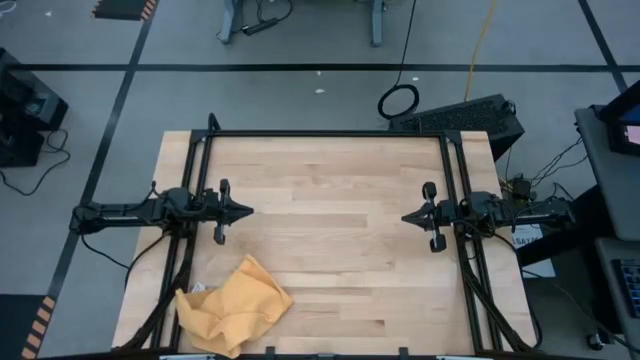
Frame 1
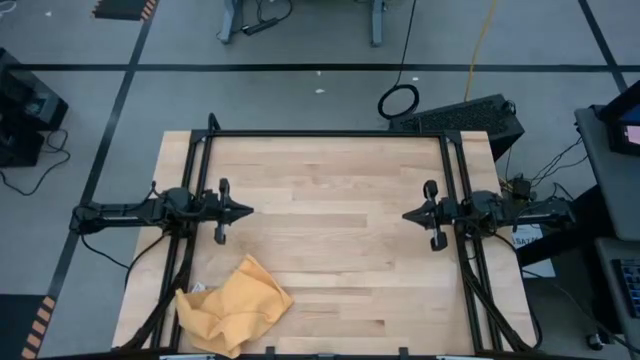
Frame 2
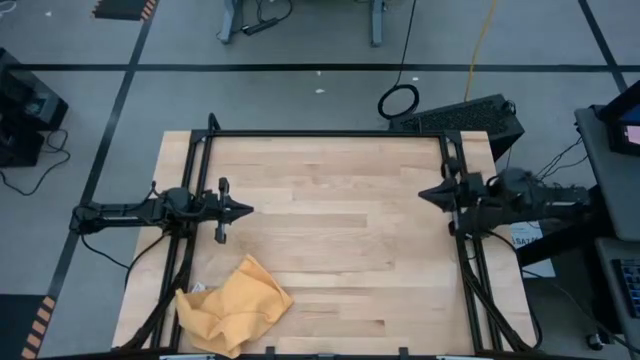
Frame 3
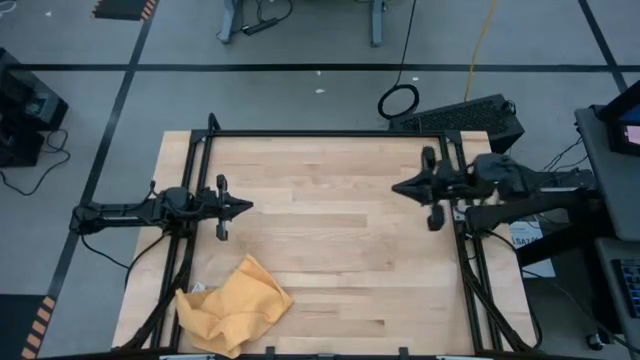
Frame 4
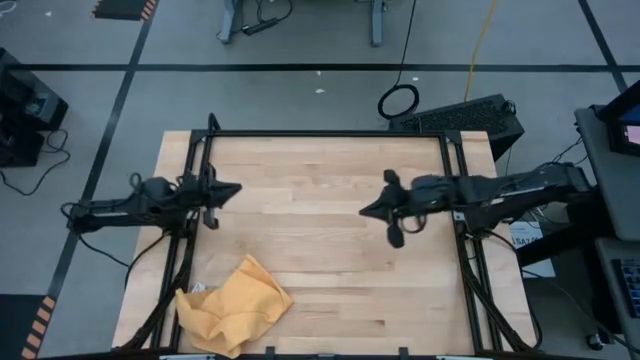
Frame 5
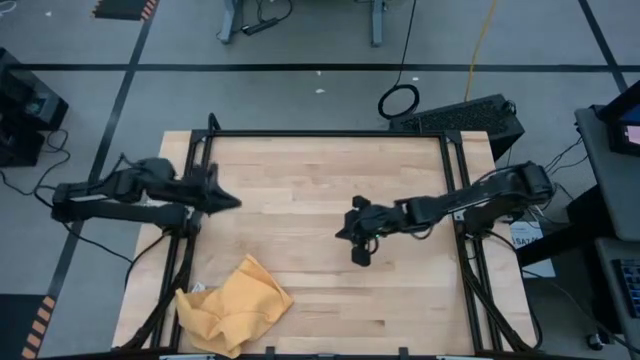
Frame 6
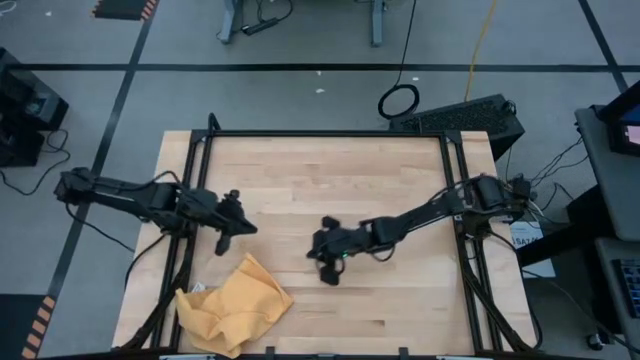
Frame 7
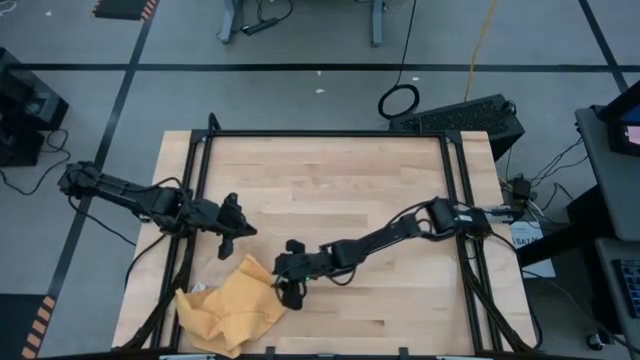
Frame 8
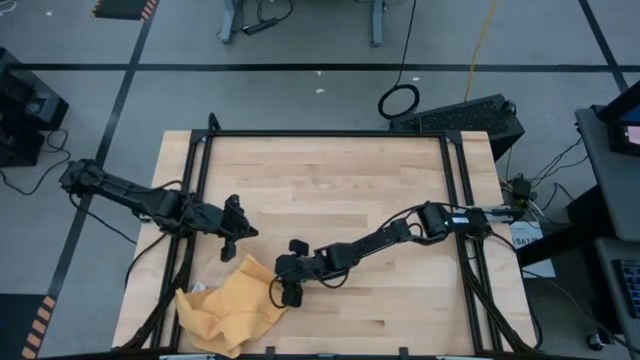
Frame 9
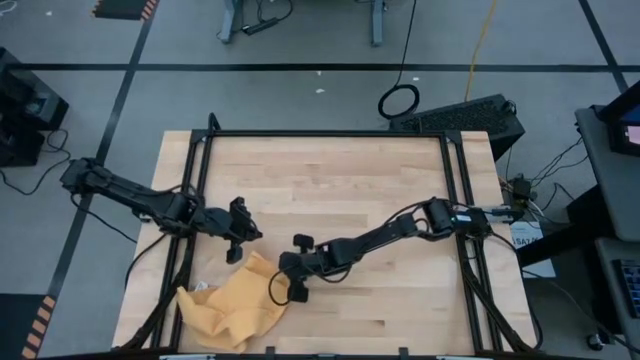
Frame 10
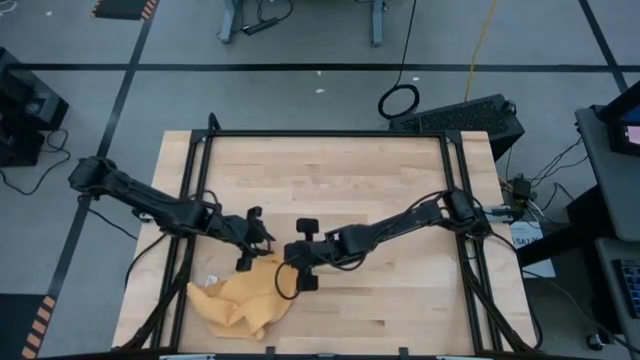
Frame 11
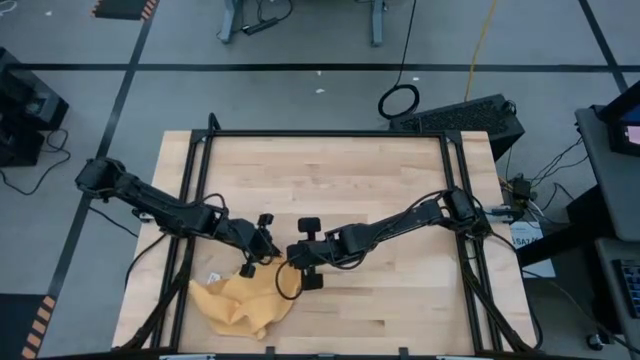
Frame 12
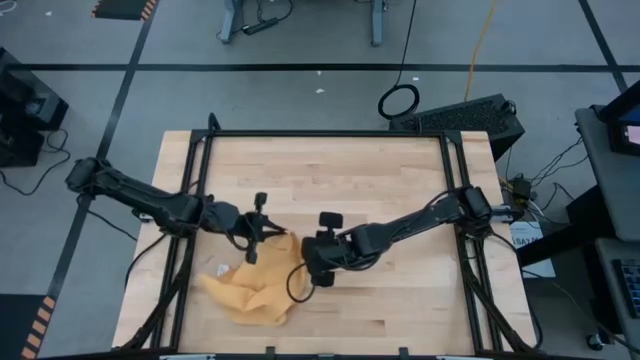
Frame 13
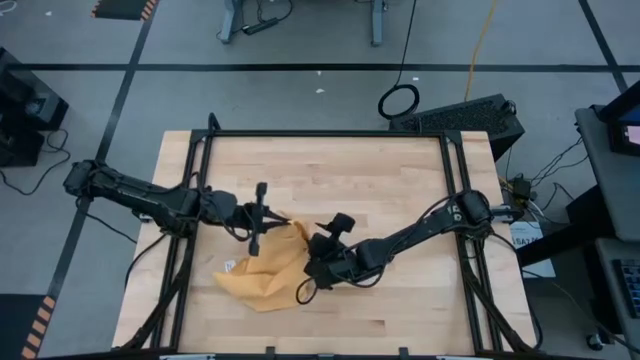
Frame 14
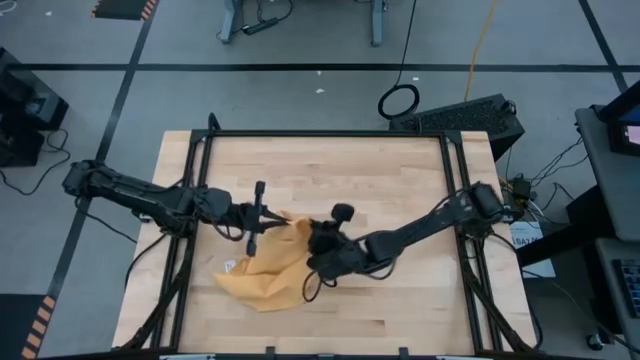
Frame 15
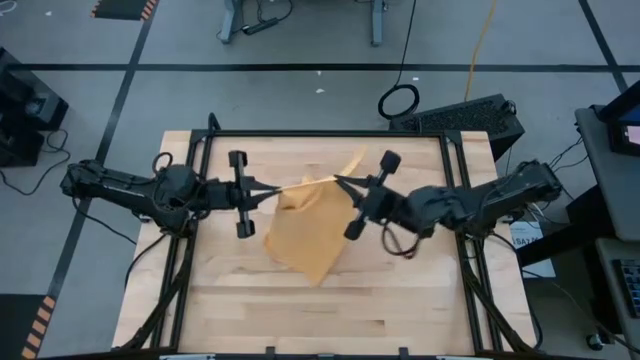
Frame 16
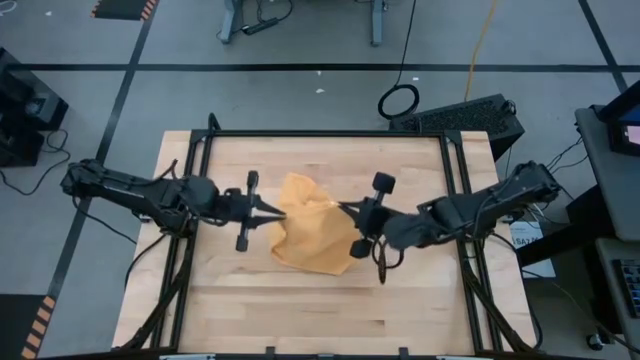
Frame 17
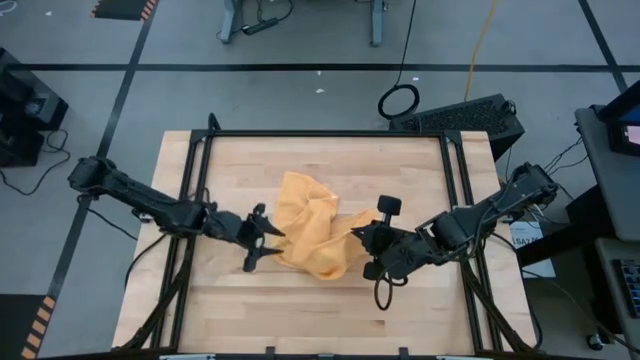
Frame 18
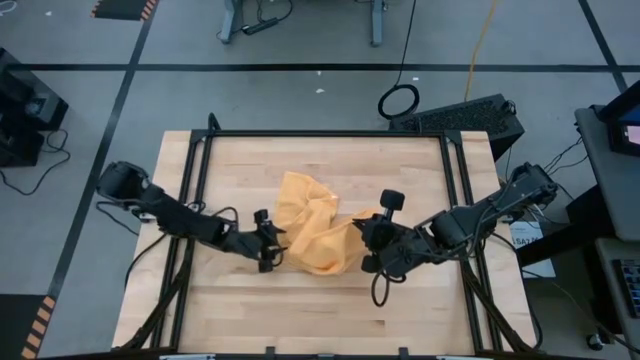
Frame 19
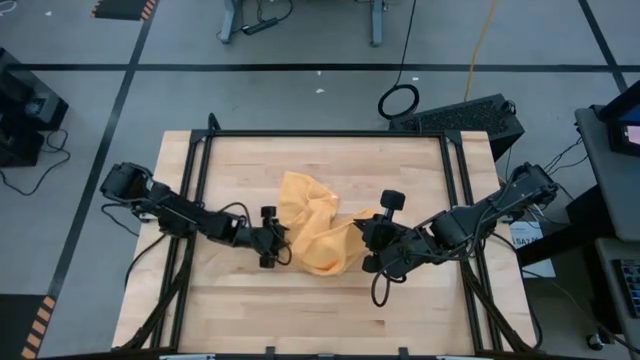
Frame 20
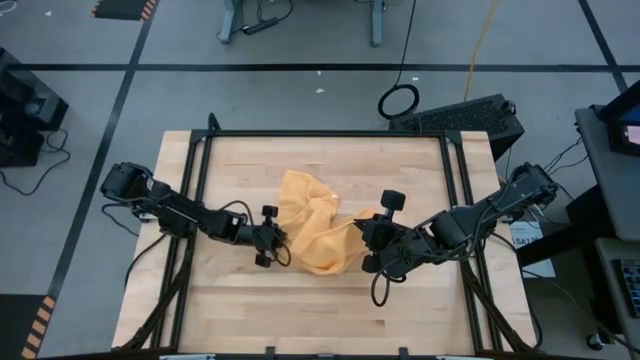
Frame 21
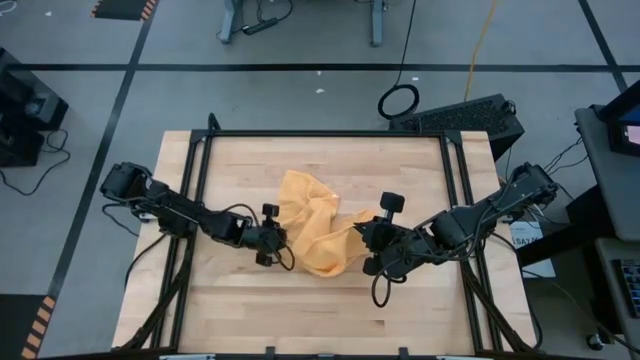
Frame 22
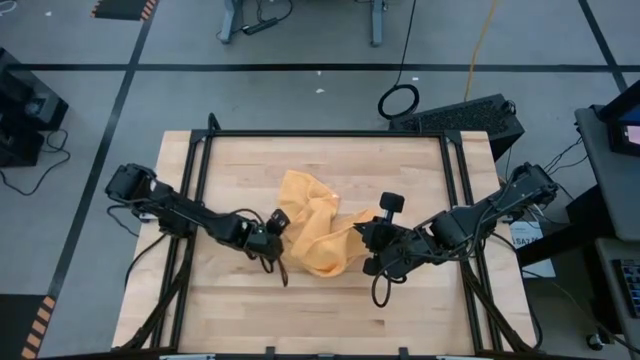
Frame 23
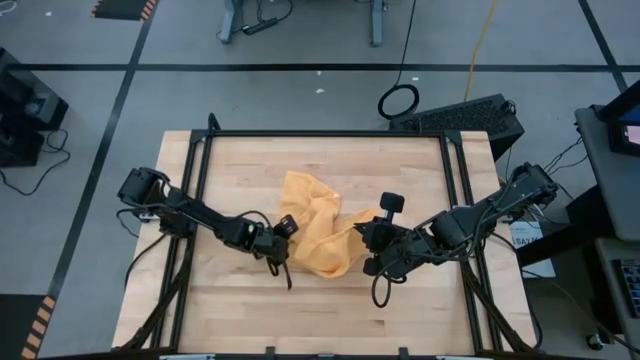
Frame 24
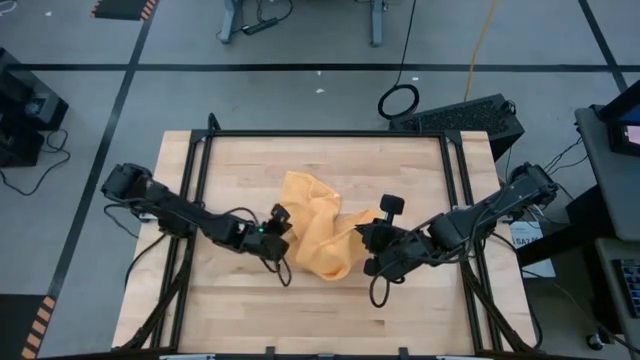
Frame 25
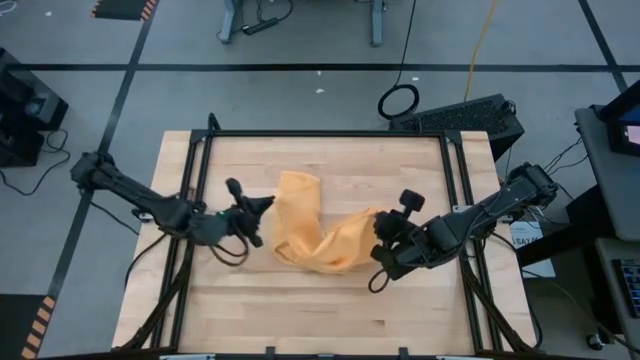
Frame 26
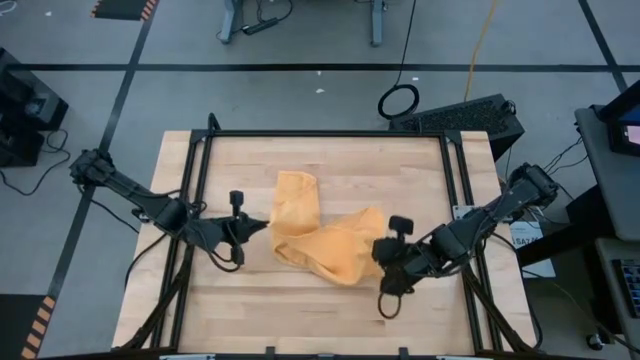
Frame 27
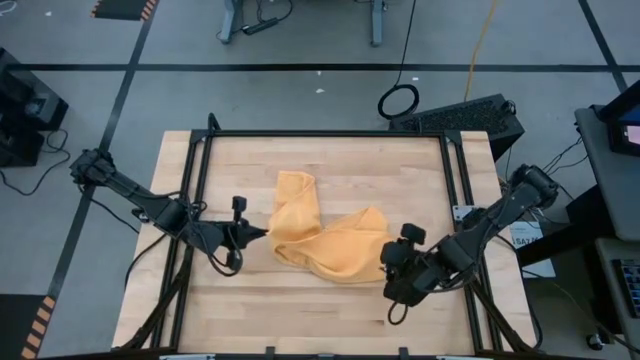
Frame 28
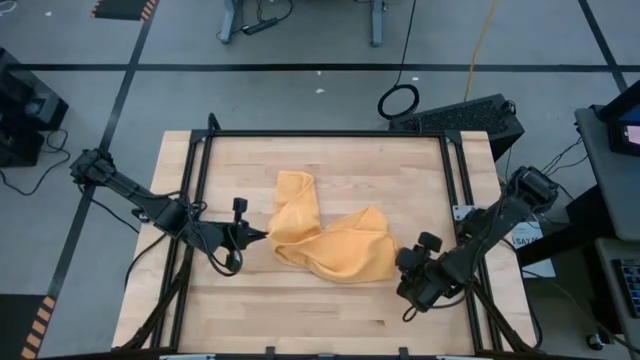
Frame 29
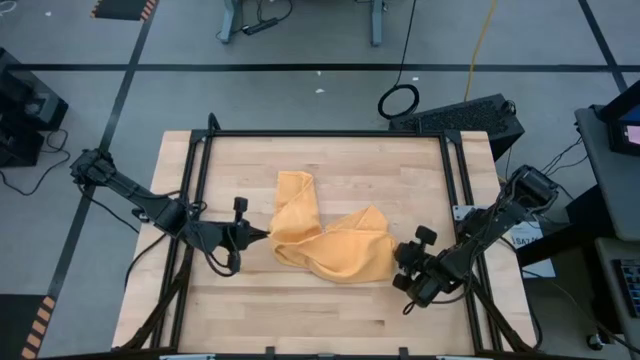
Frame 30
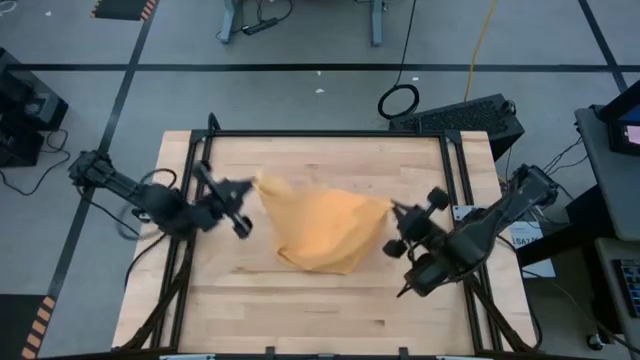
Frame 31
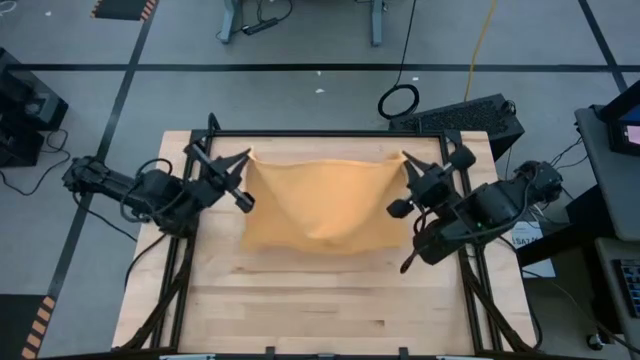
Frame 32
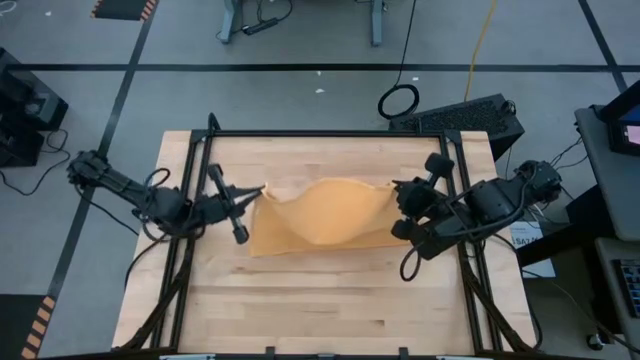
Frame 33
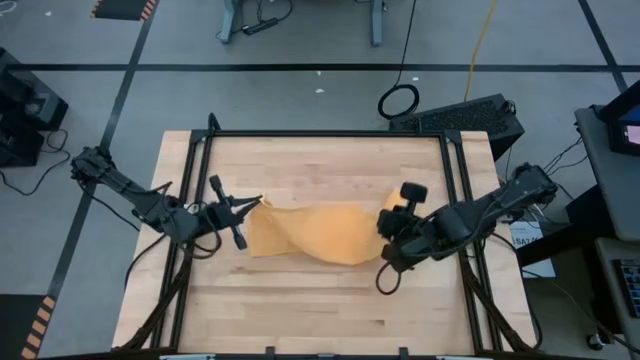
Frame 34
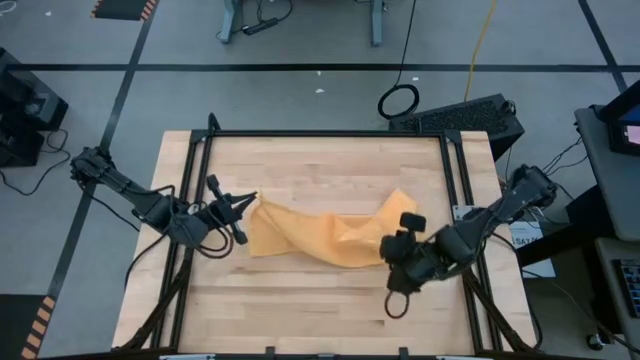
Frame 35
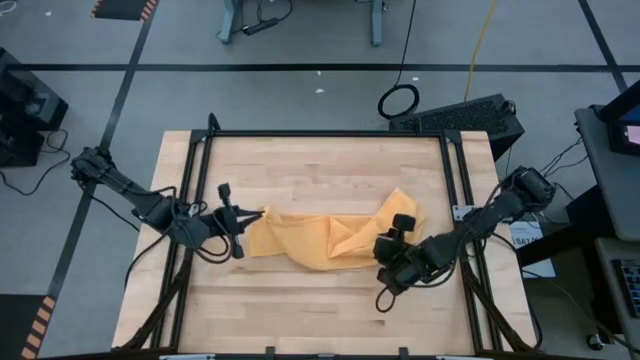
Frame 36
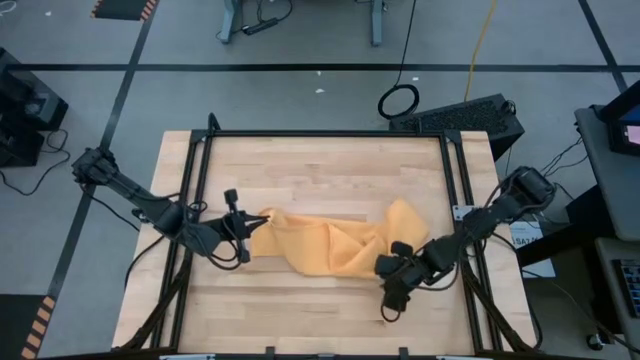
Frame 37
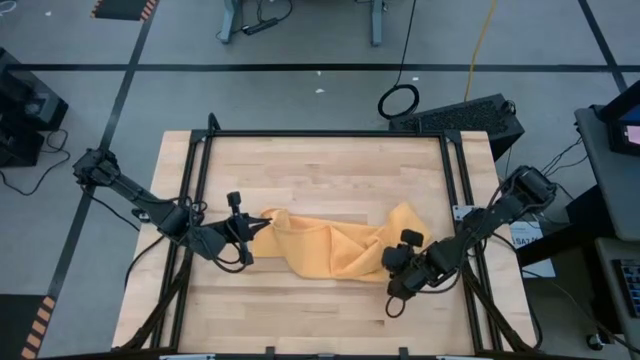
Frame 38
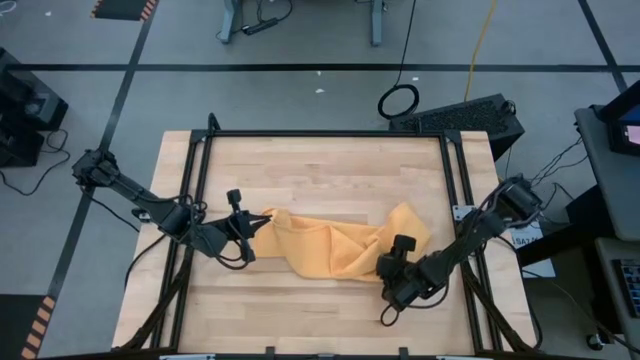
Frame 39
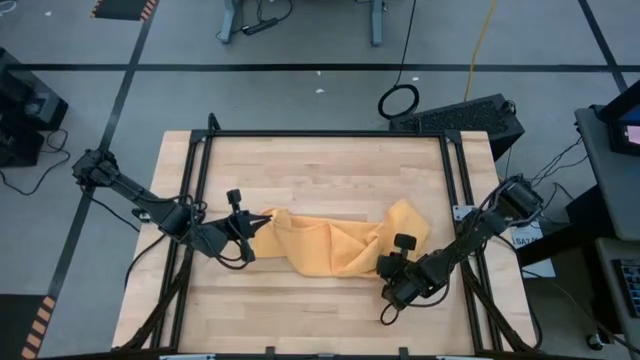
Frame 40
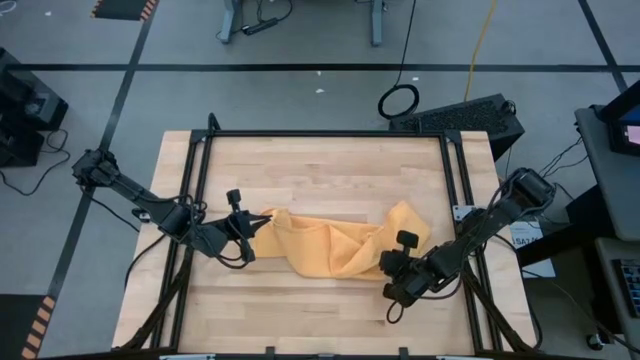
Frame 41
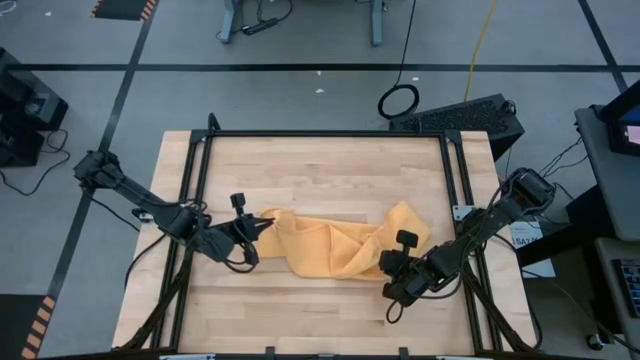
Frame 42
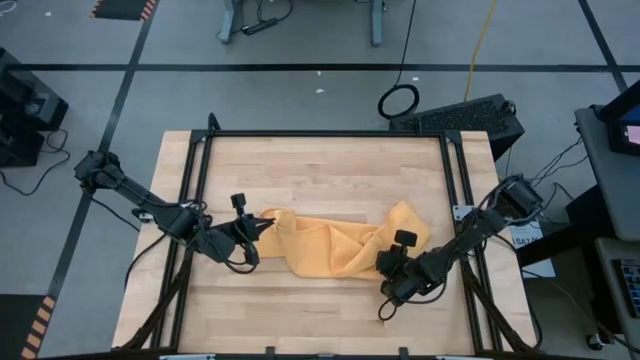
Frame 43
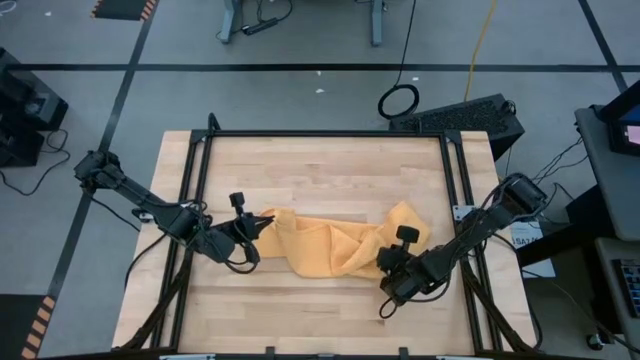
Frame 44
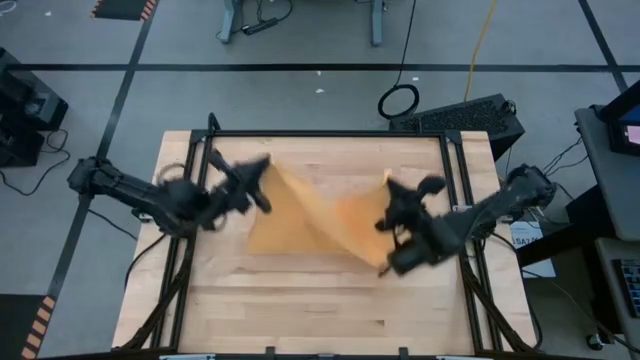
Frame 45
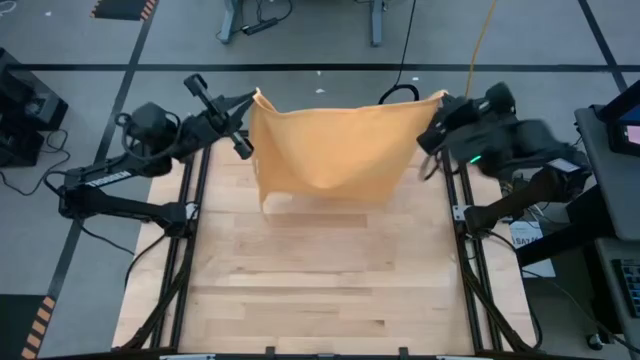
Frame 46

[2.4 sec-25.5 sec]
Task: Roll towel into tight, uniform cylinder
Roll the orange towel
